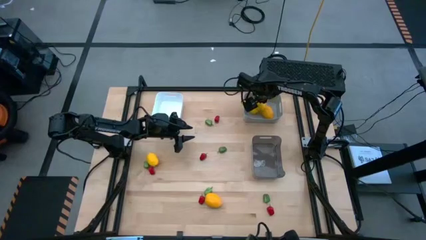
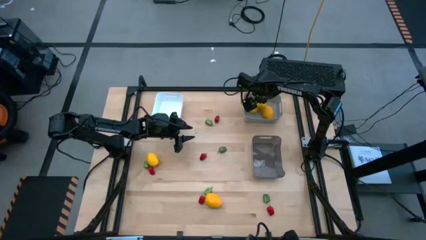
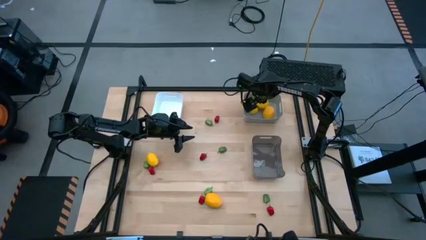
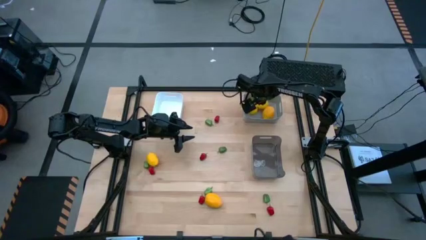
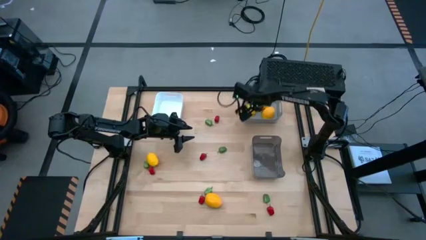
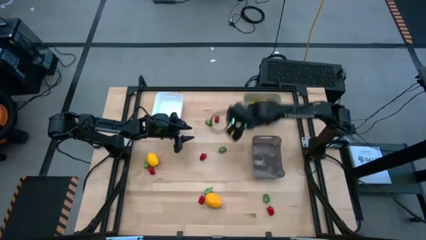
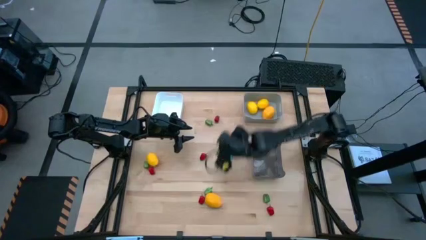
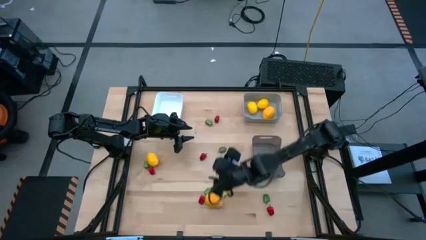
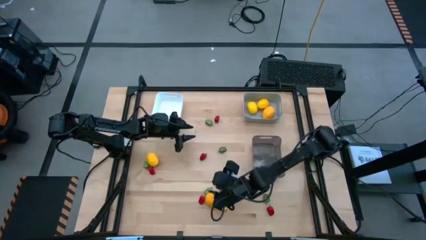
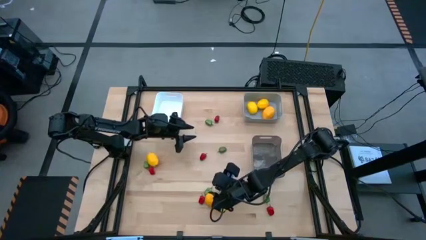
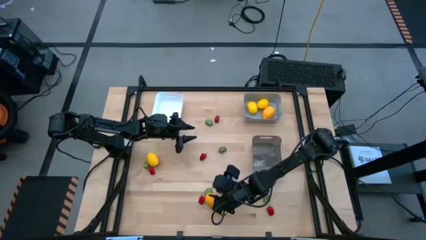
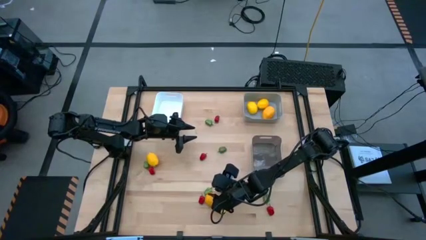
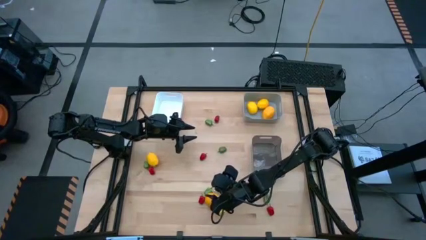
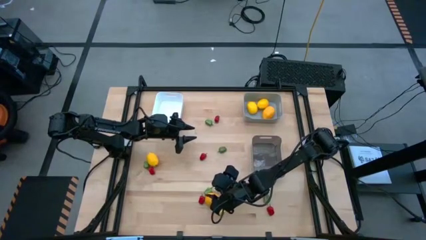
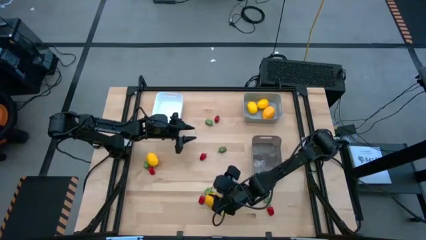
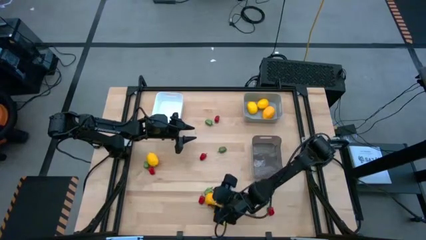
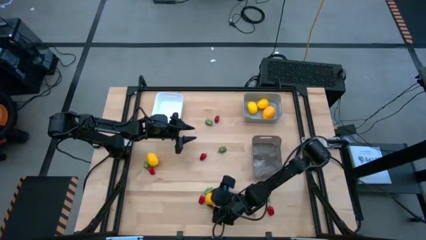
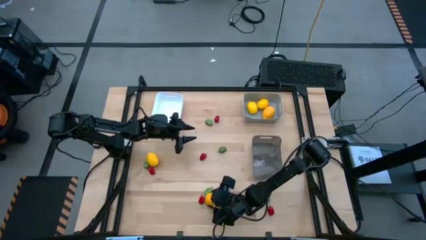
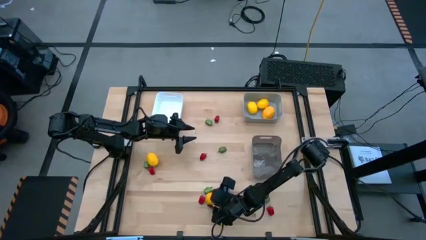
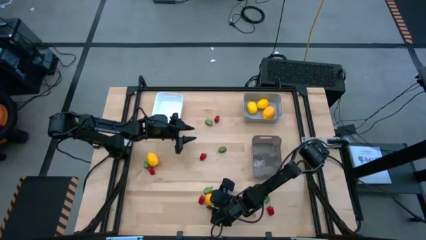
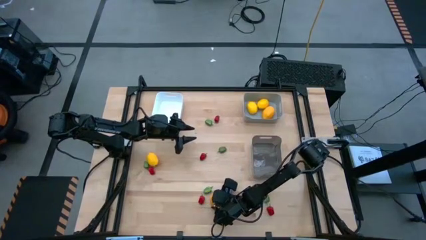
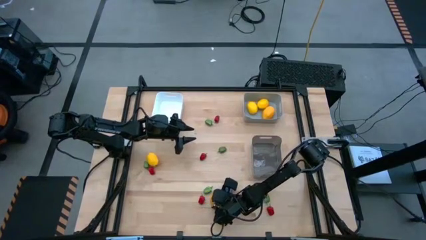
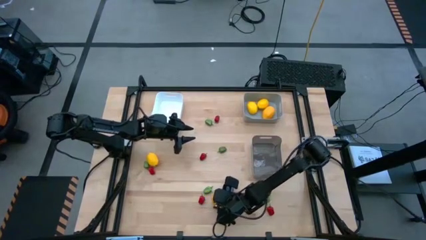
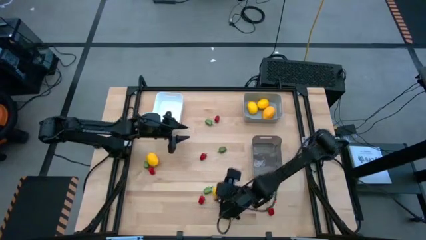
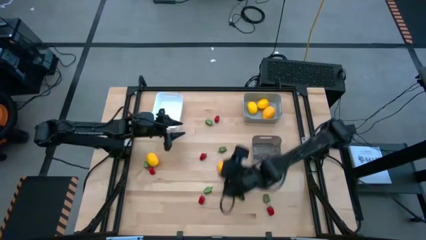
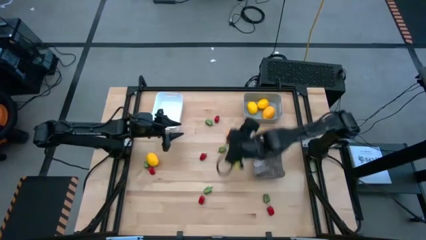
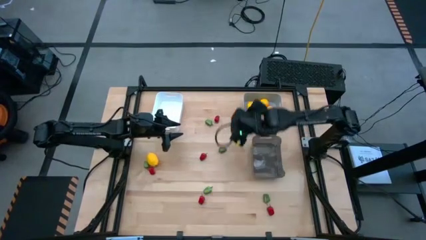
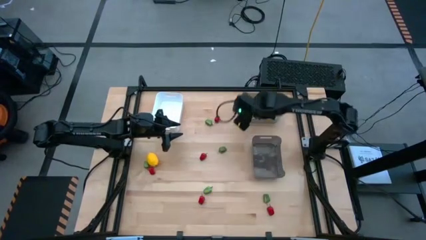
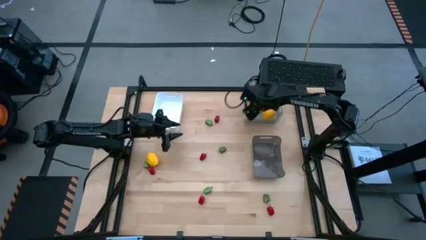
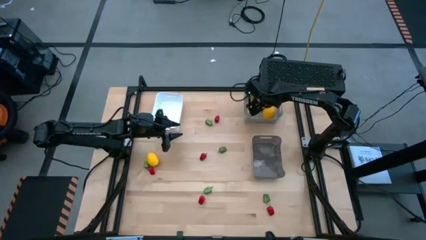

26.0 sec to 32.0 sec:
Task: Sort produce into baskets
Put the yellow lemon into the gray bin

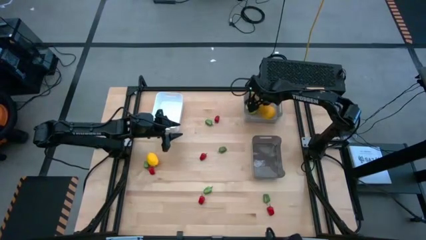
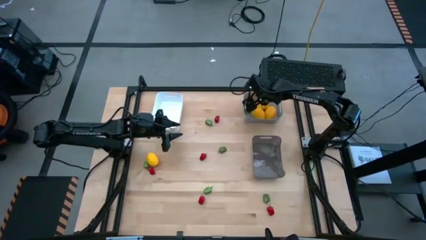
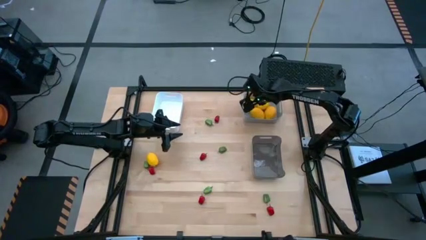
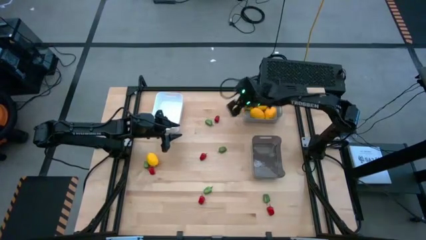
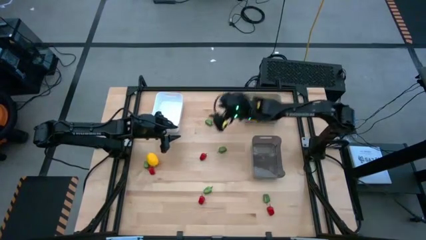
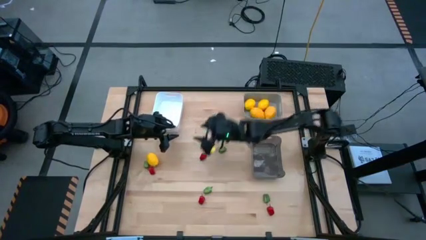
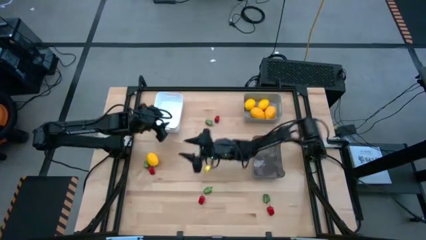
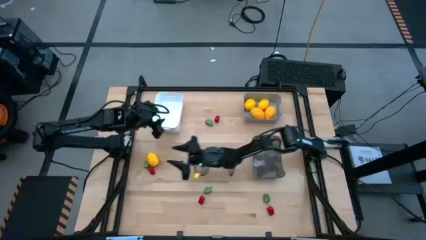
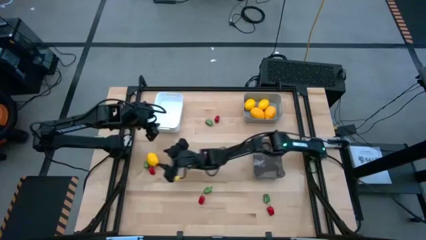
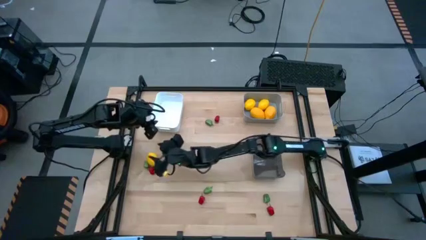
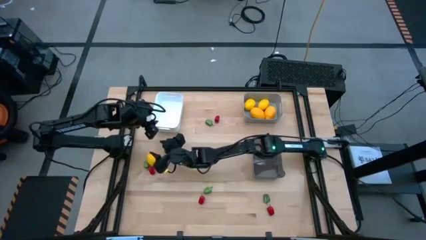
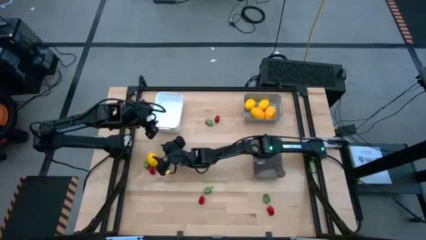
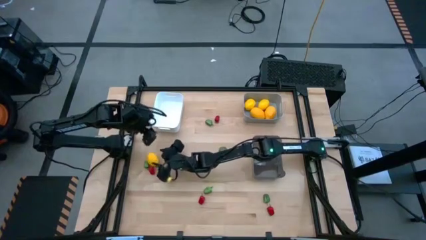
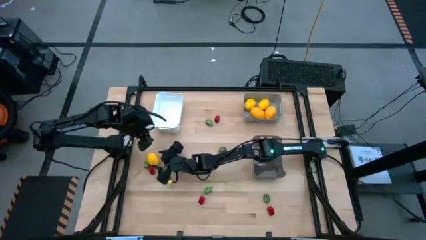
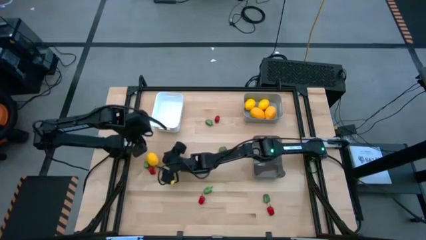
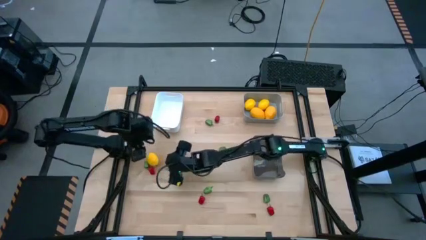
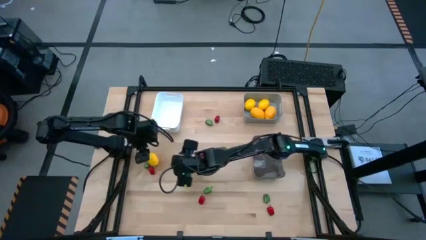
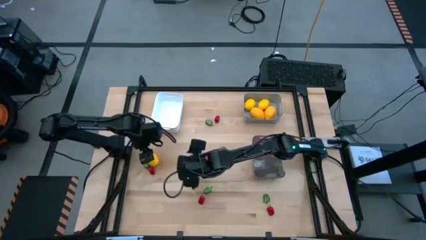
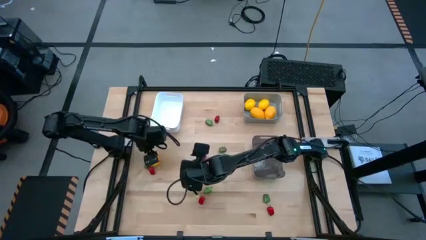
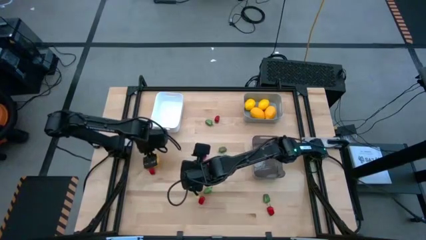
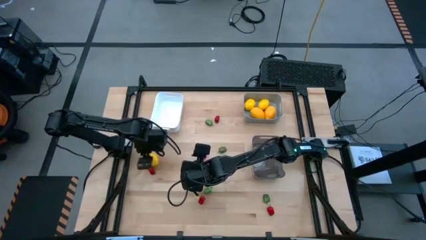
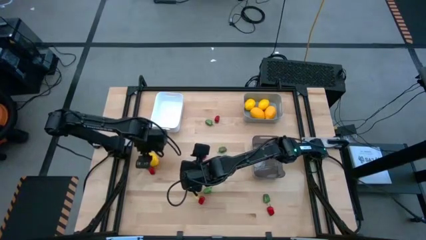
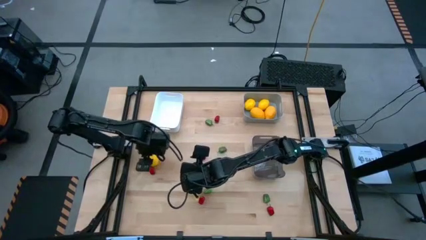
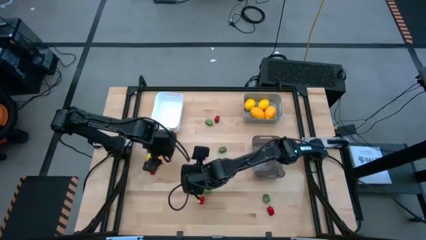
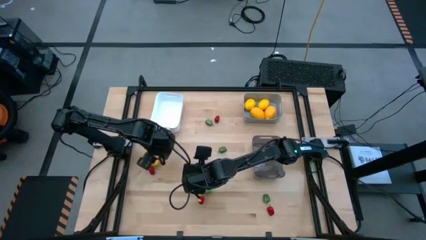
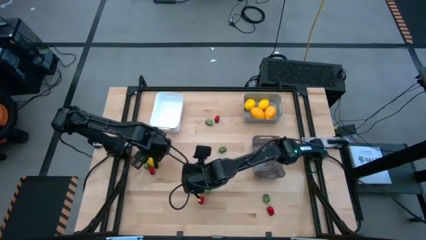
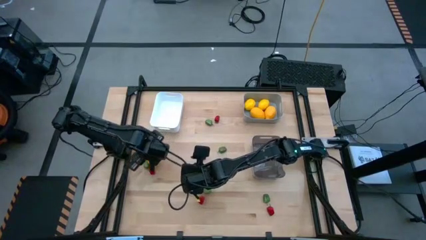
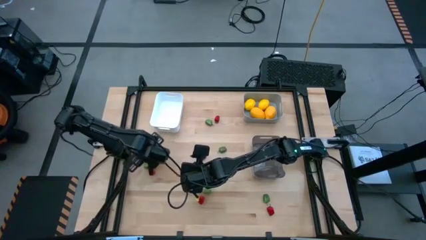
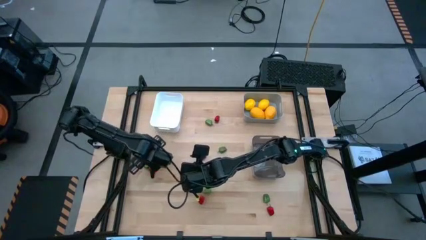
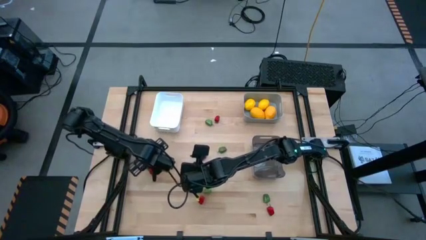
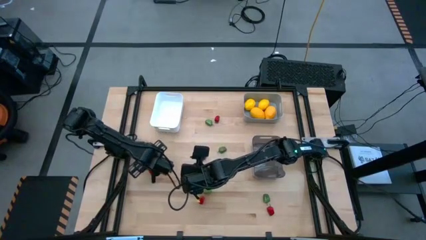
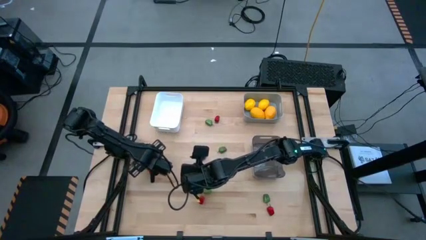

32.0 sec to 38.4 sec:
Put the yellow lemon into the gray bin

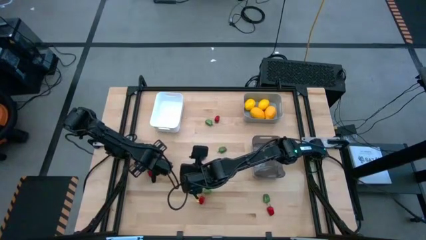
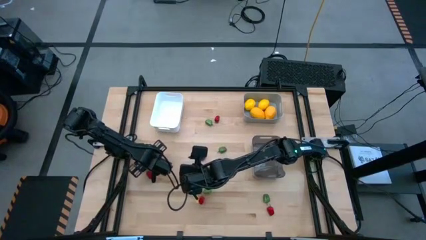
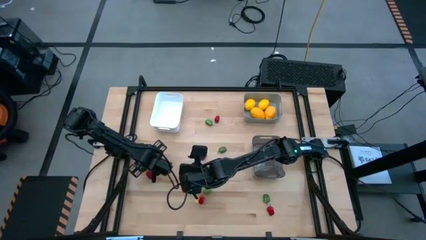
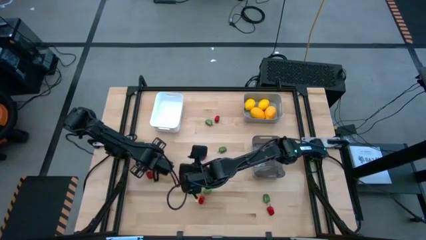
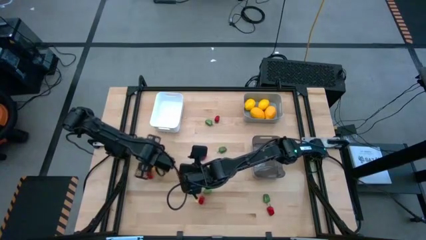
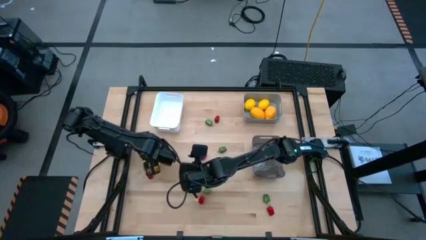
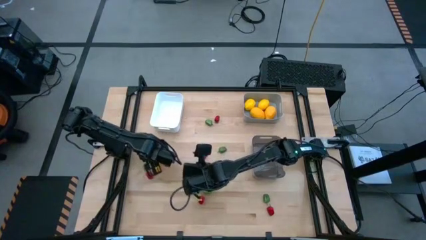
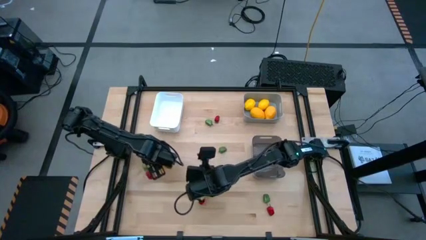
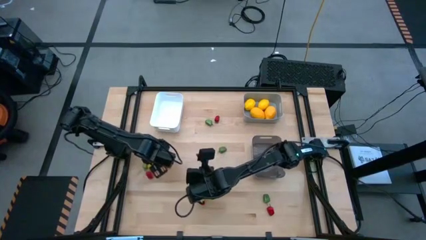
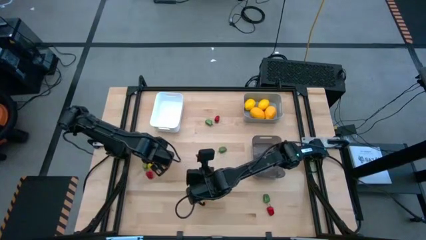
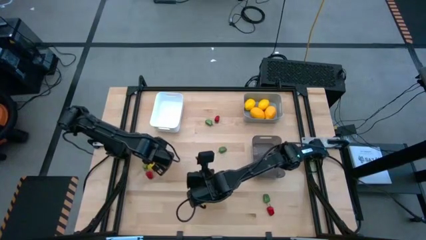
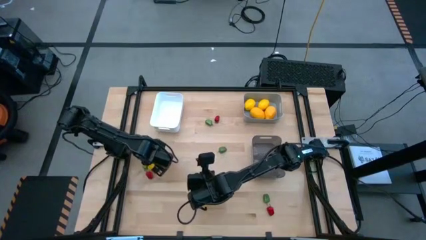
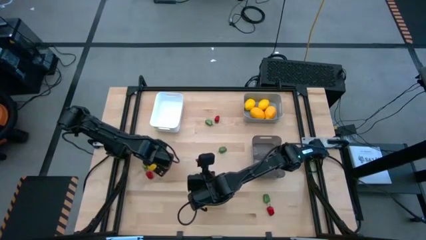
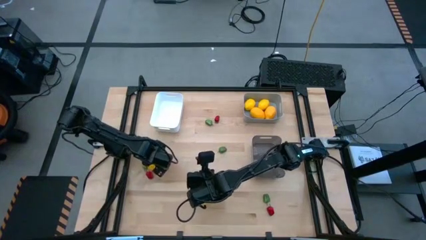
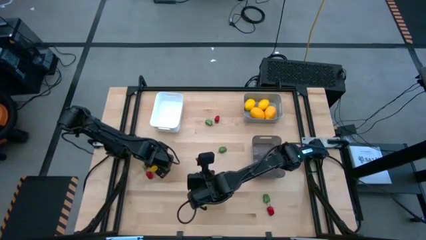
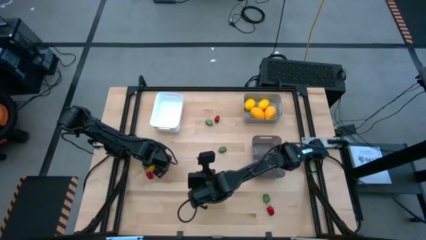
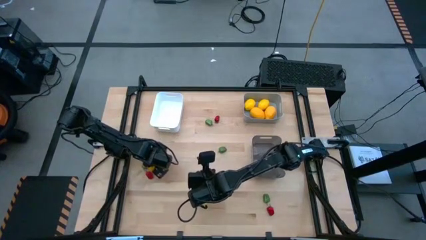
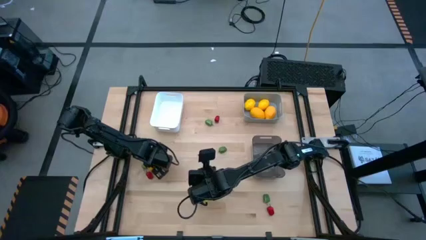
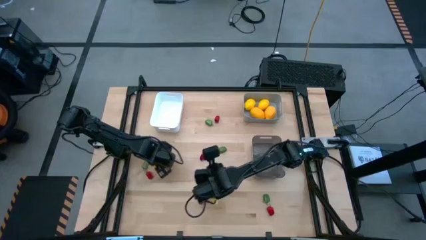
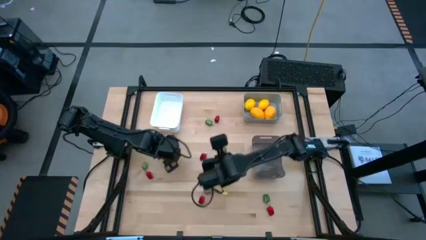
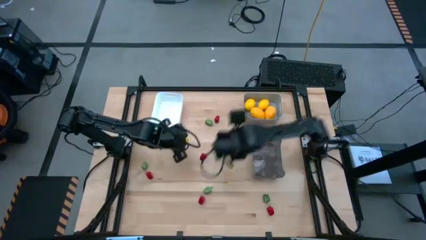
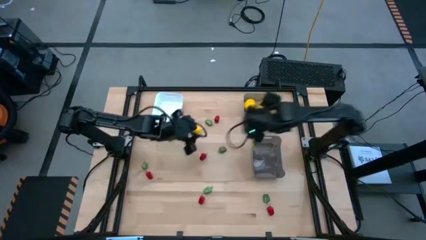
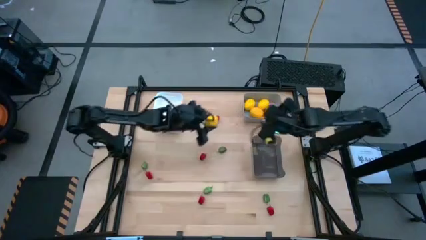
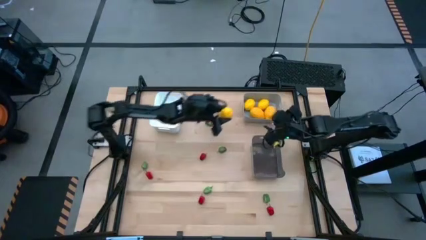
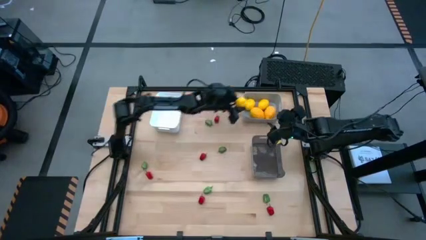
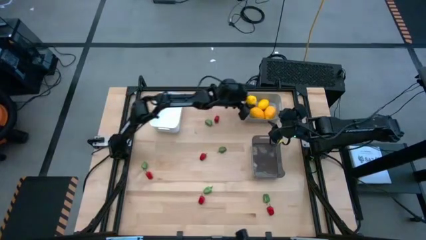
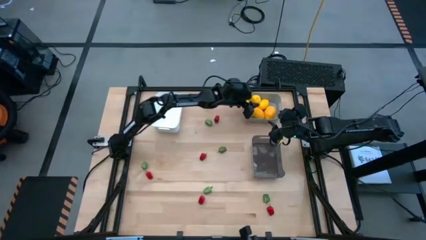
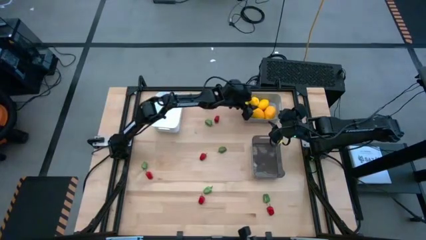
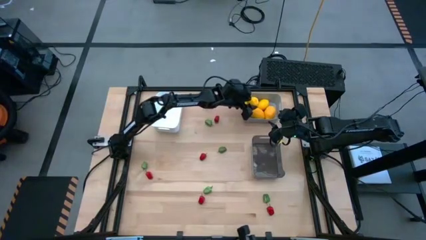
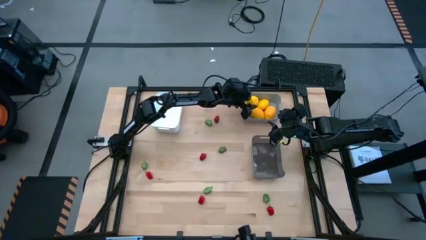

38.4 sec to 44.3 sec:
Put the yellow lemon into the gray bin
